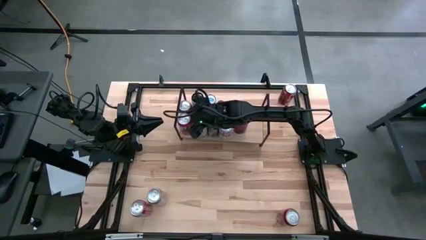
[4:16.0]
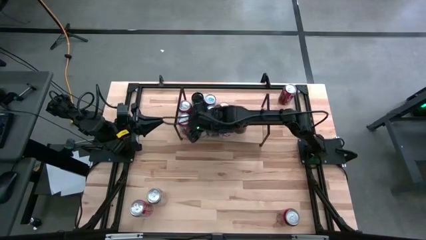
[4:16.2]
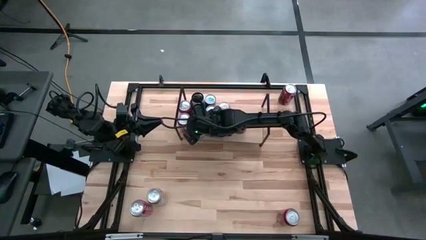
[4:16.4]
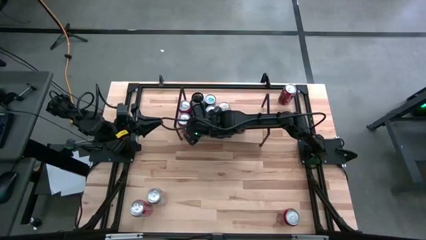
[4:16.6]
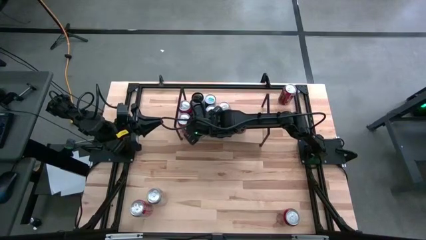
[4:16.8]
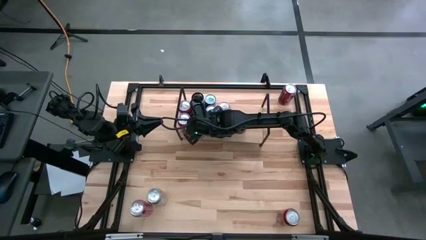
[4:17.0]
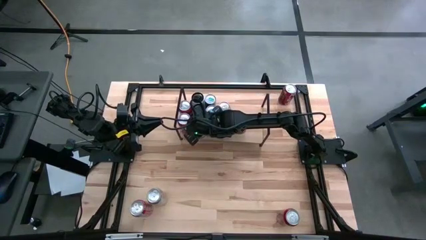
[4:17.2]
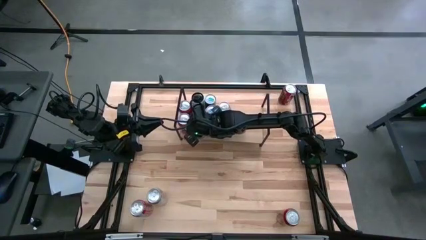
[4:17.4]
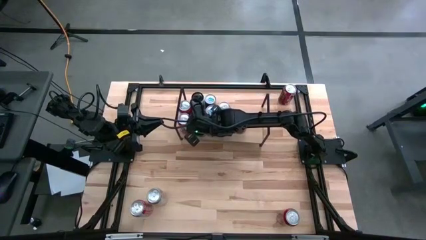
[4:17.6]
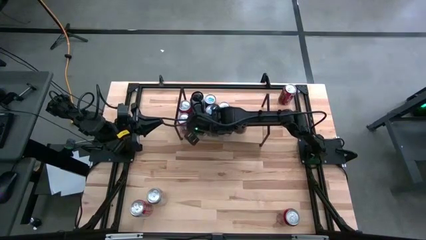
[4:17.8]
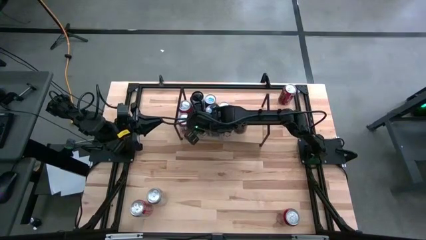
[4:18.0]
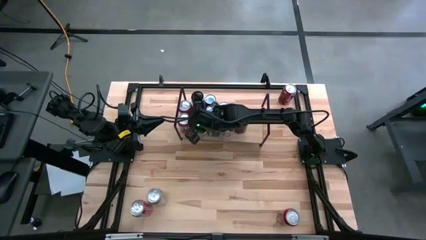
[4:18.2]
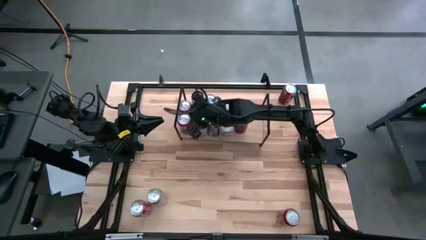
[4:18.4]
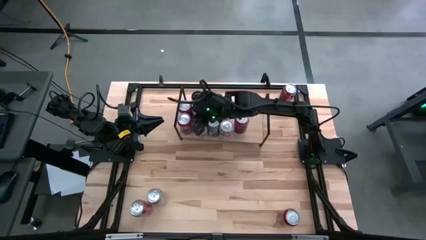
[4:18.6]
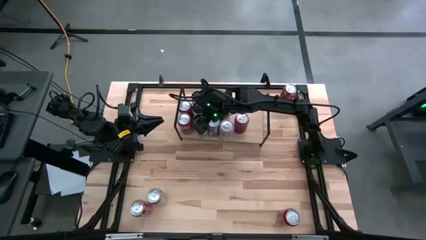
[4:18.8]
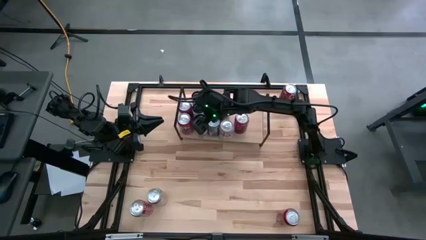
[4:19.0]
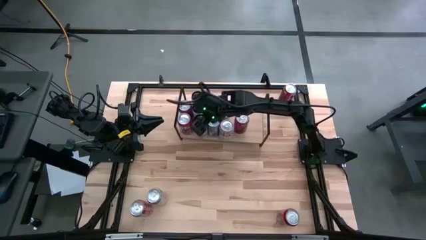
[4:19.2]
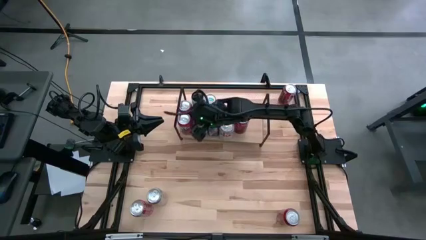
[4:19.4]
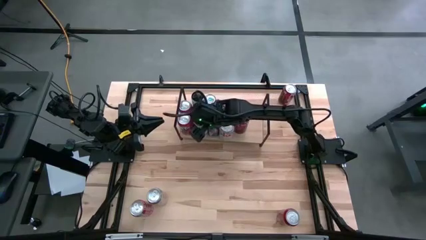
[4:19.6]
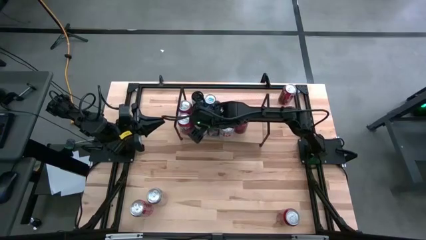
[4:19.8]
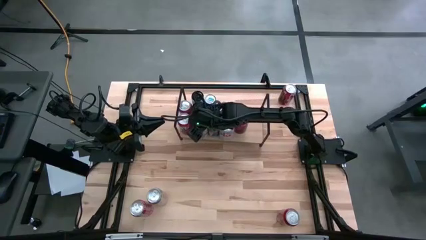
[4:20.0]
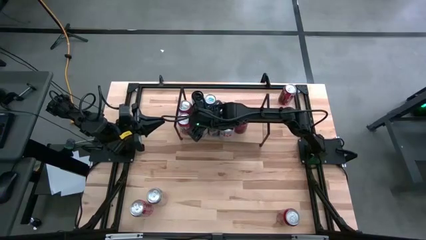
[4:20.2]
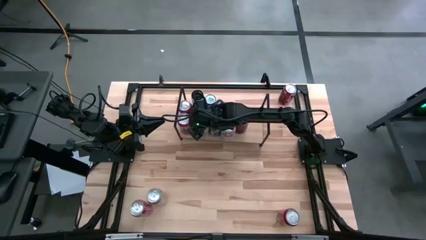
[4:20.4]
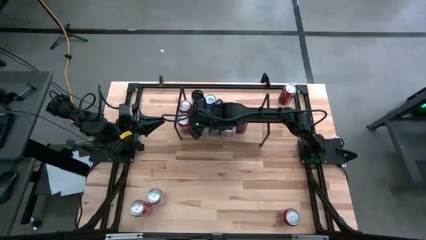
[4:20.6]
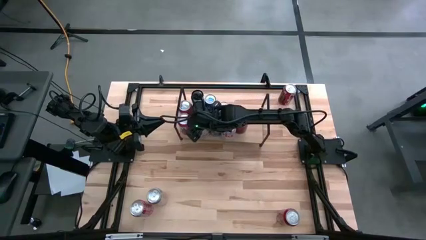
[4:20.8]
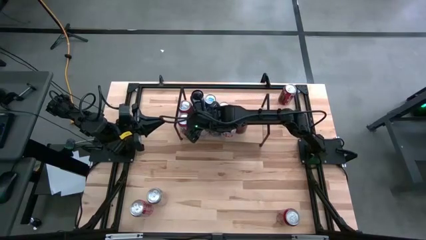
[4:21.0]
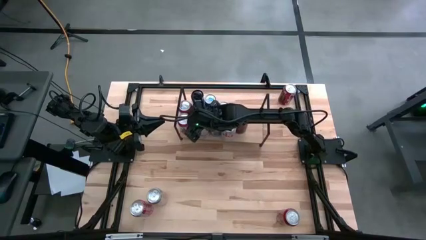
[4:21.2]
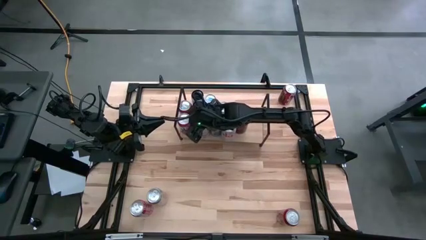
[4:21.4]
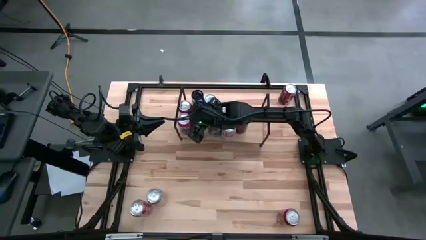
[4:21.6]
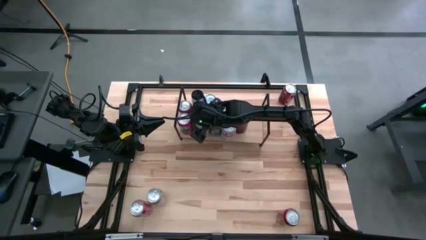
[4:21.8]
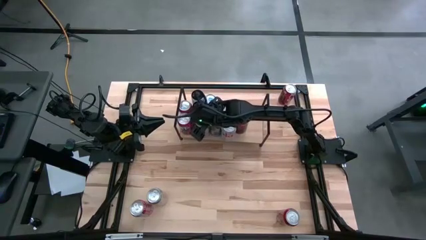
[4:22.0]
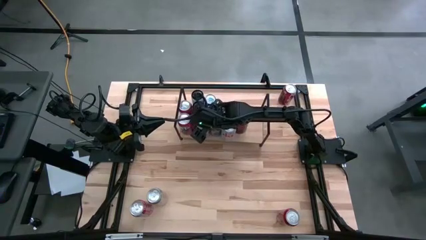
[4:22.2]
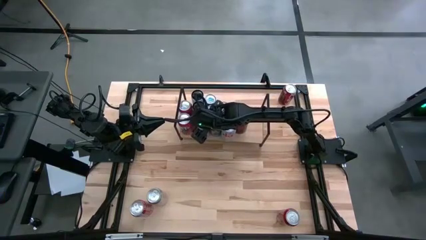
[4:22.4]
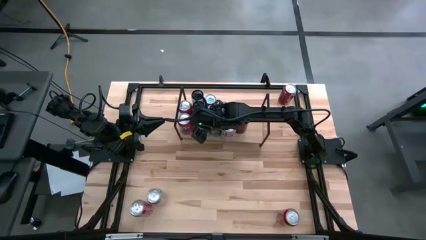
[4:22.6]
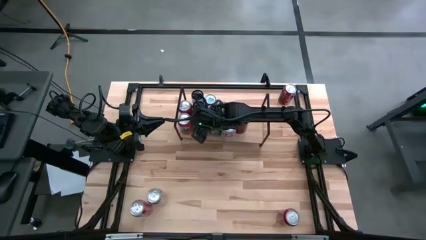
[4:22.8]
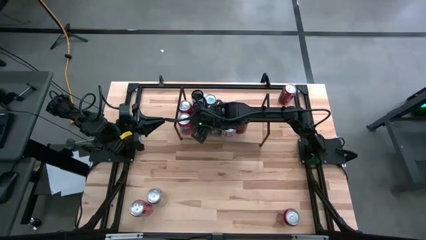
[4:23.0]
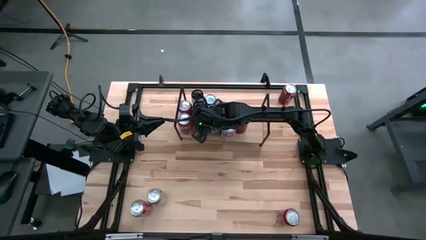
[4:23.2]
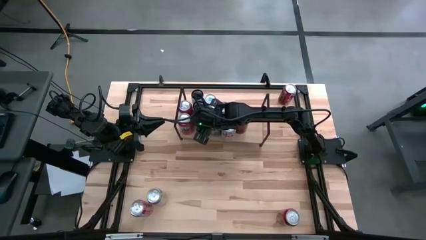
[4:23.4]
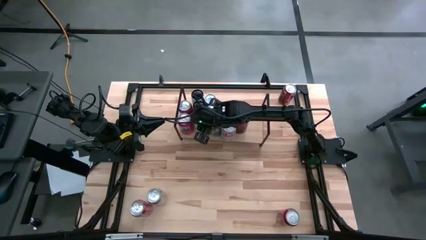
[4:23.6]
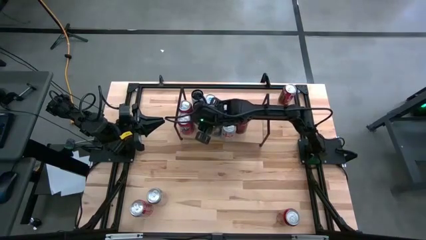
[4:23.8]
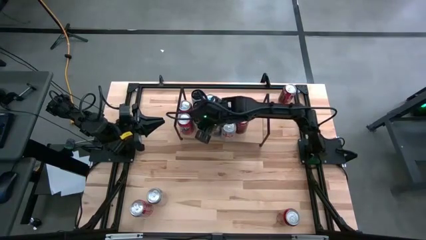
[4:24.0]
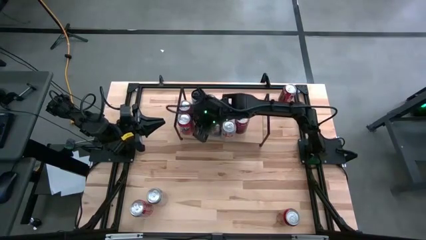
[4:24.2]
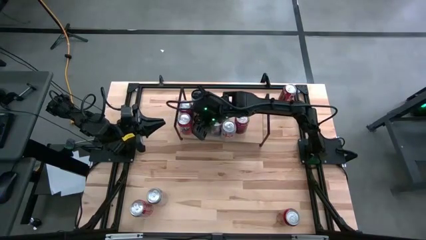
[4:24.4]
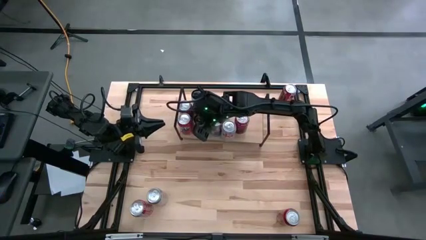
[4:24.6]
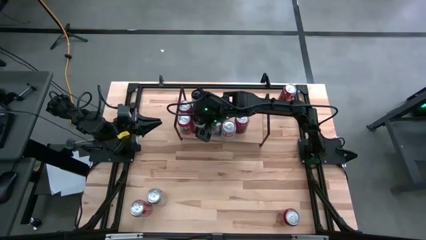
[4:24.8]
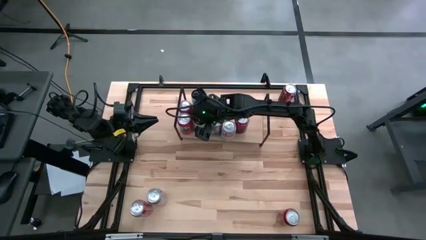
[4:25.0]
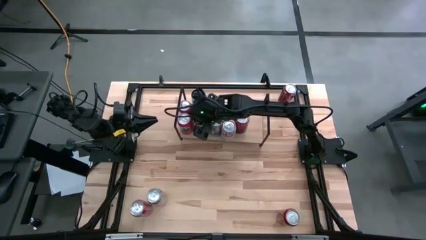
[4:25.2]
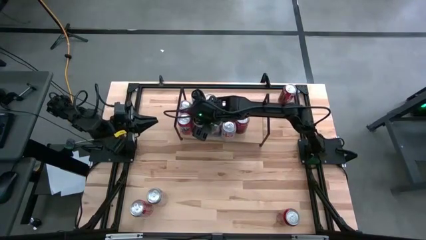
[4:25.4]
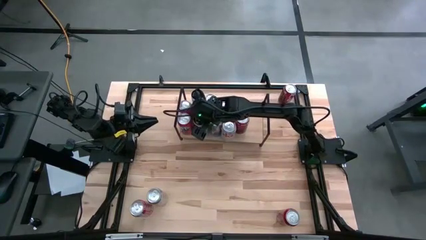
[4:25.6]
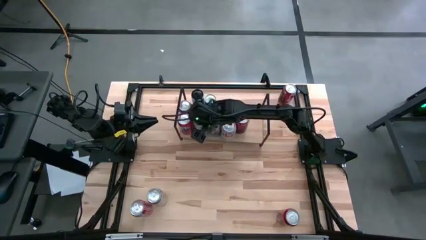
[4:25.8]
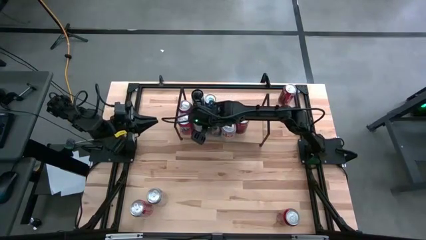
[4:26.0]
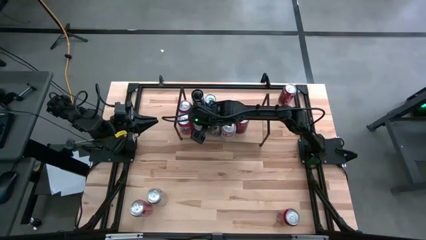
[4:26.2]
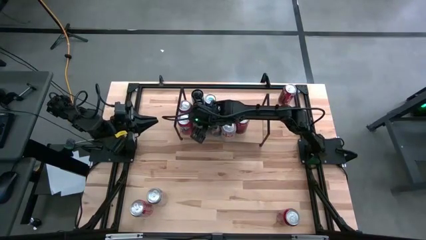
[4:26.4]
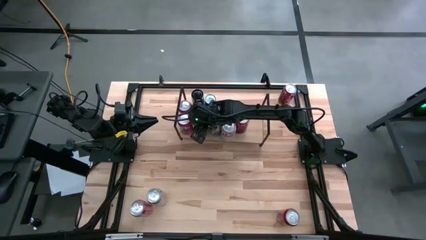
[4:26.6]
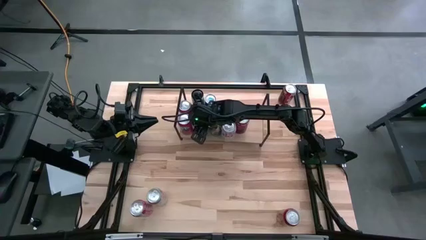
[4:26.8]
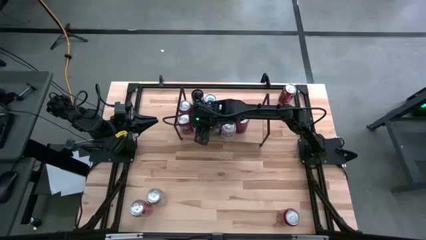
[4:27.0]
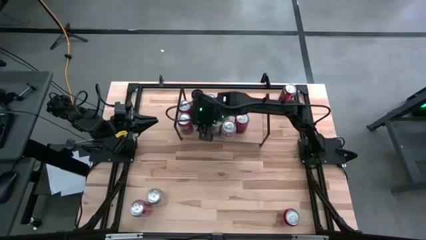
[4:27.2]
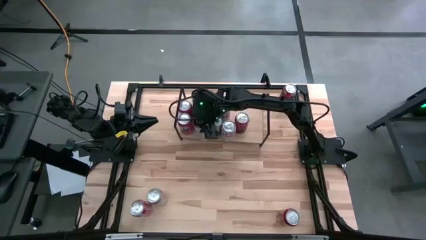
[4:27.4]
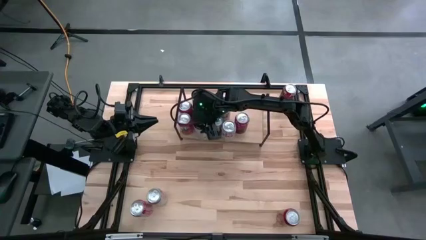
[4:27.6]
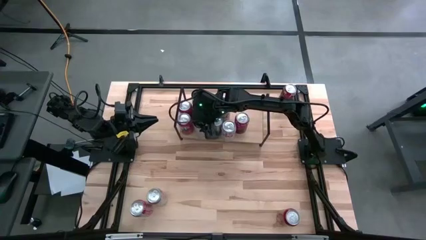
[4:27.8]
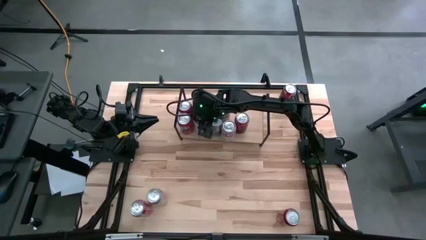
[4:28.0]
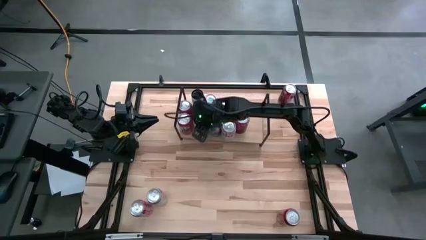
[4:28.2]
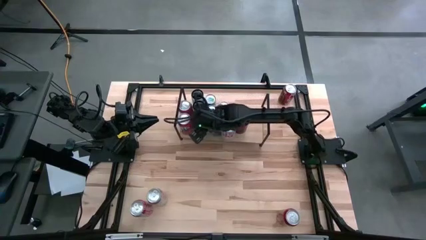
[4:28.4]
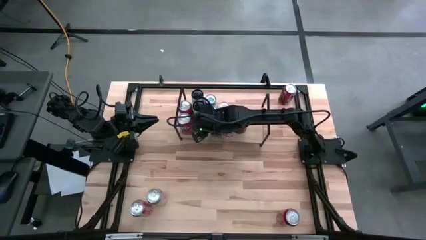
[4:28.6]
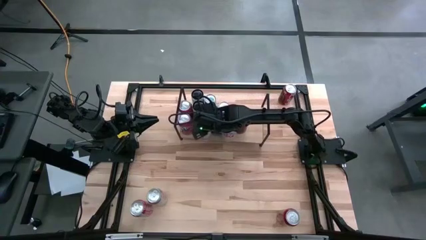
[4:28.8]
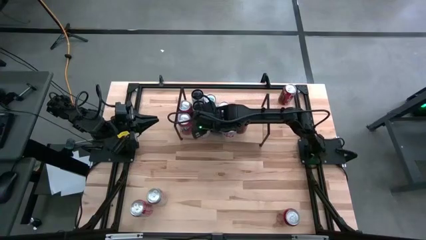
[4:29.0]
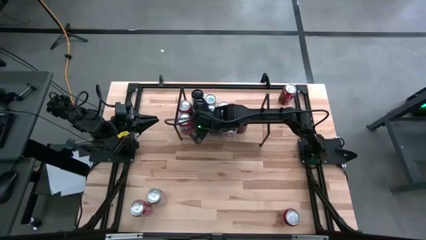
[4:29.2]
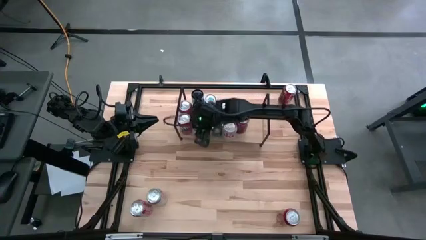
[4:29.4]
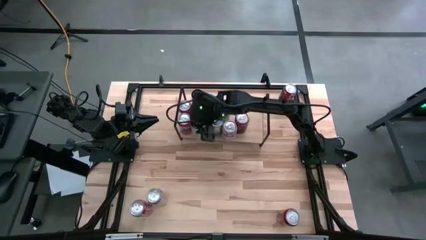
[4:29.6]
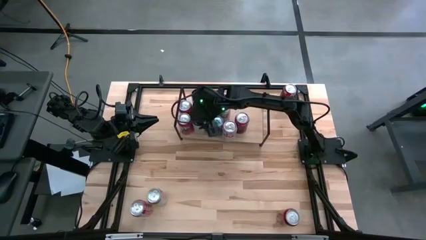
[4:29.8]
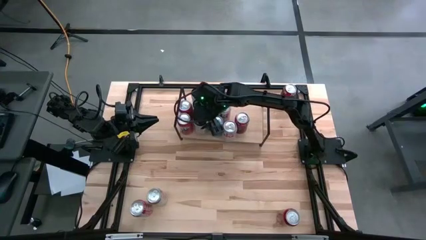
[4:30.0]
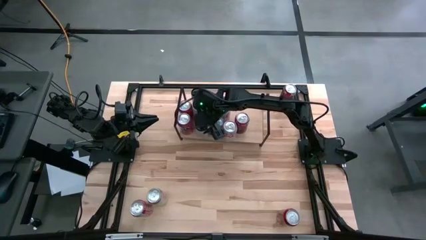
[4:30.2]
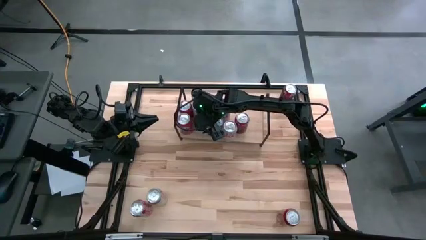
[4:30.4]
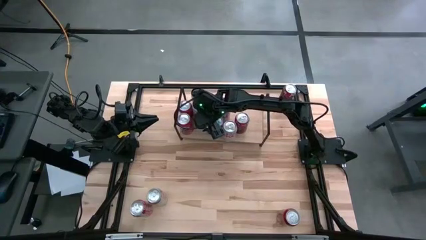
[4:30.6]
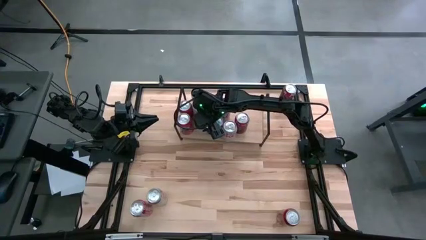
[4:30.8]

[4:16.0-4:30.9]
Task: Place canned beverage on shelf
Put the white-pink soda can on the shelf aligned with the other white-pink soda cans

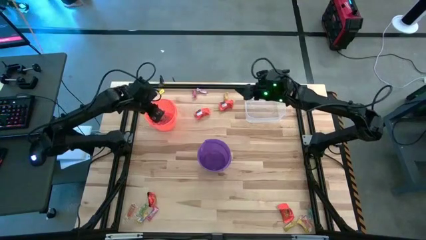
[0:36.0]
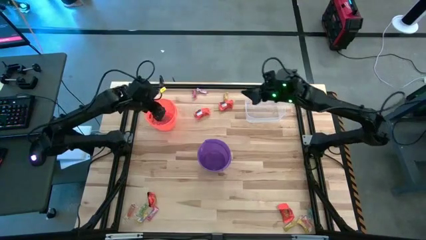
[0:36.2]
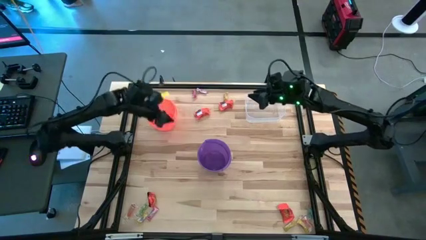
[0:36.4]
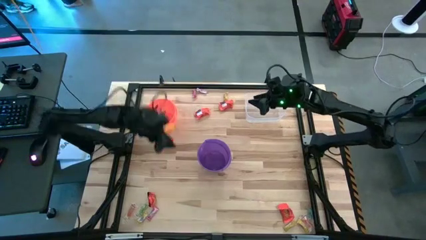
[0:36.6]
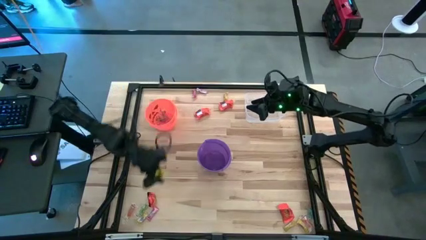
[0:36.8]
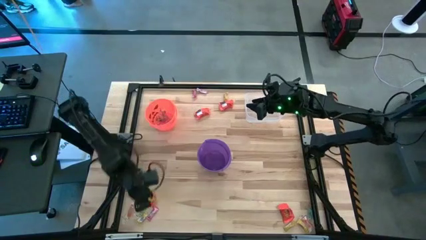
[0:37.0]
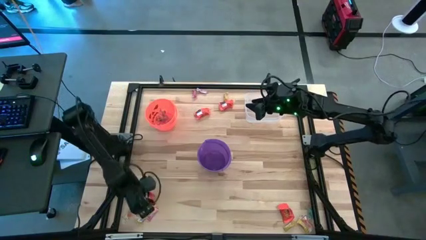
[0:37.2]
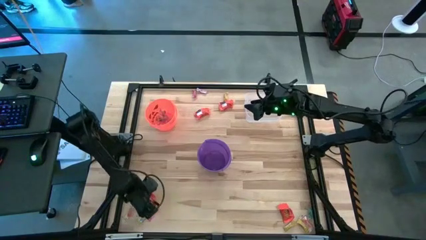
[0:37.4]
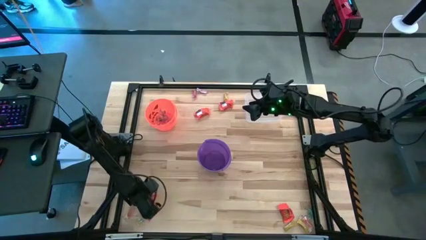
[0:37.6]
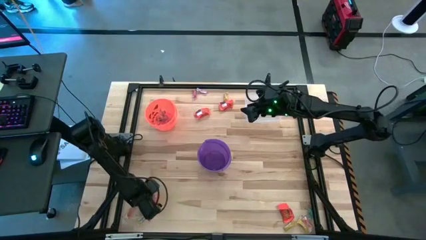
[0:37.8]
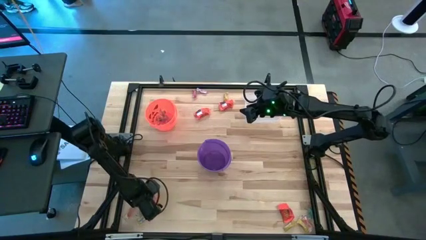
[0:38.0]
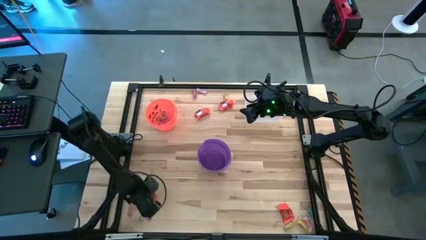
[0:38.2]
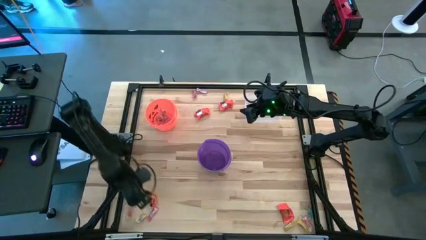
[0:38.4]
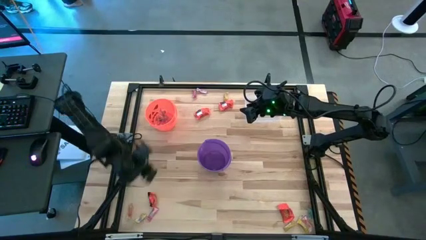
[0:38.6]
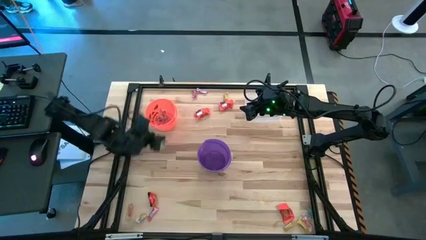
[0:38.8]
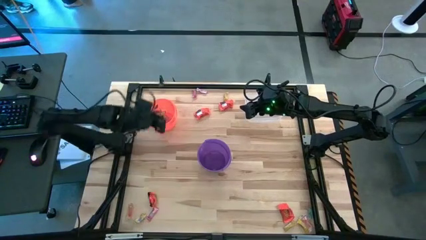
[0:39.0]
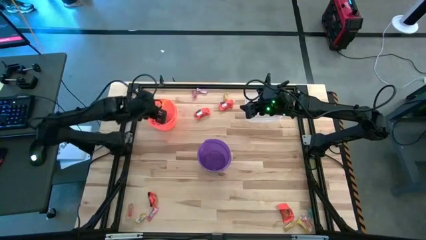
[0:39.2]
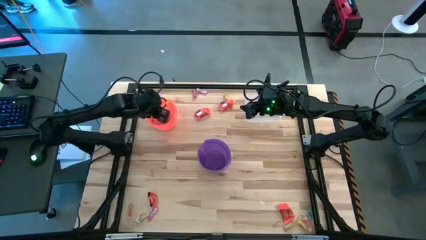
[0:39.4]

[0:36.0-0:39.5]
Task: Sort candy by brand, put in halloween buckets
Put the green gummy into the orange bucket
